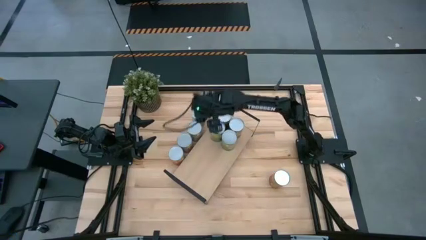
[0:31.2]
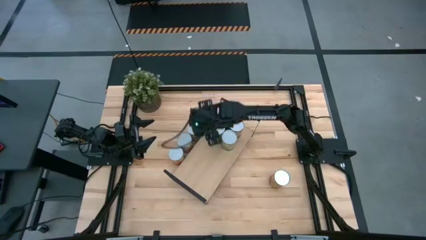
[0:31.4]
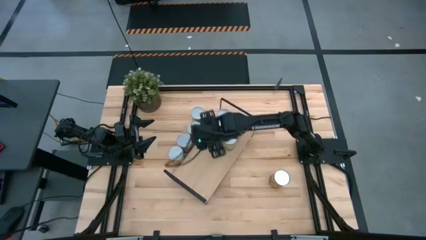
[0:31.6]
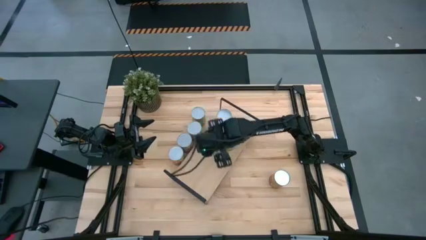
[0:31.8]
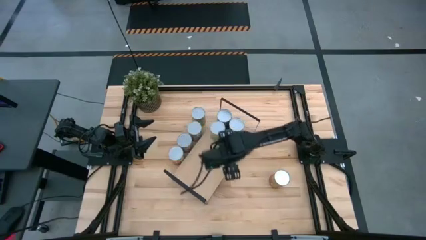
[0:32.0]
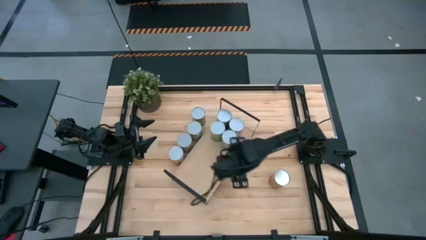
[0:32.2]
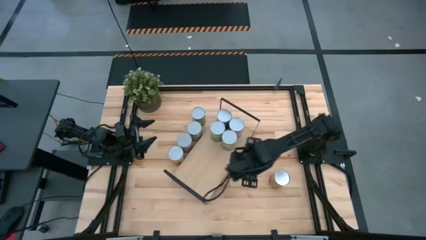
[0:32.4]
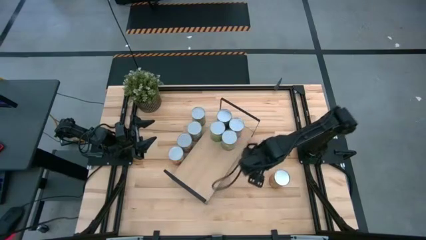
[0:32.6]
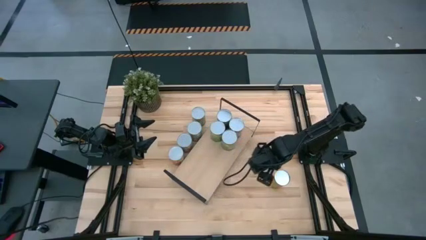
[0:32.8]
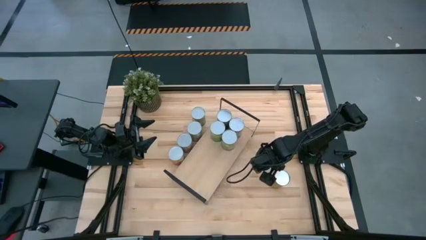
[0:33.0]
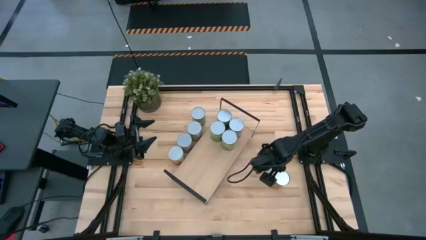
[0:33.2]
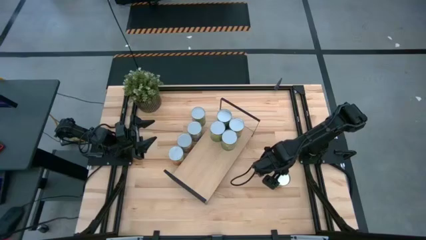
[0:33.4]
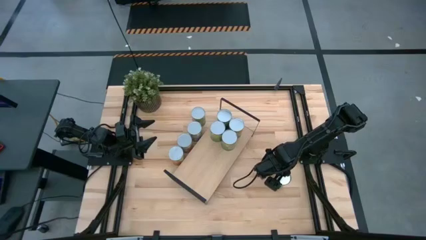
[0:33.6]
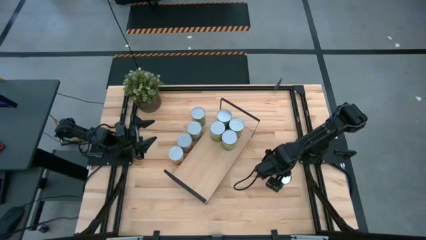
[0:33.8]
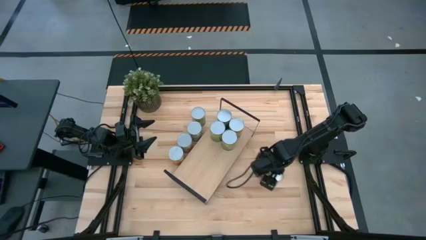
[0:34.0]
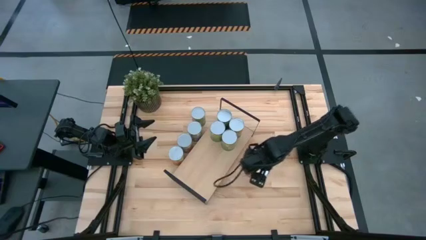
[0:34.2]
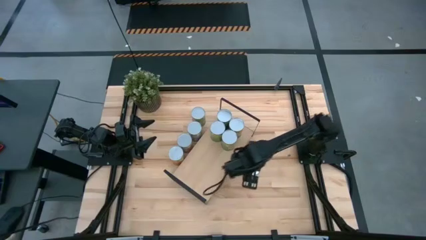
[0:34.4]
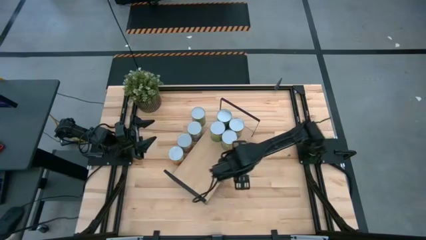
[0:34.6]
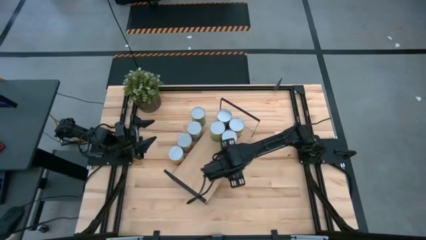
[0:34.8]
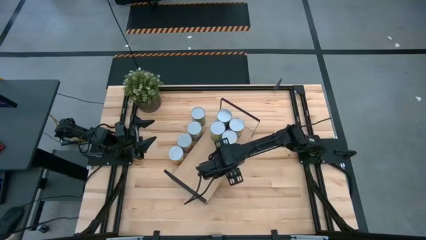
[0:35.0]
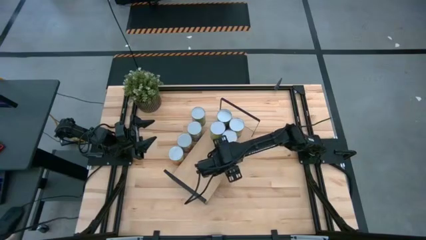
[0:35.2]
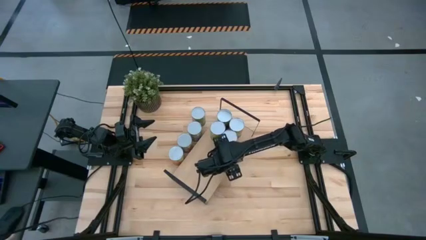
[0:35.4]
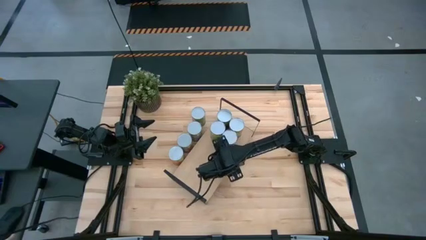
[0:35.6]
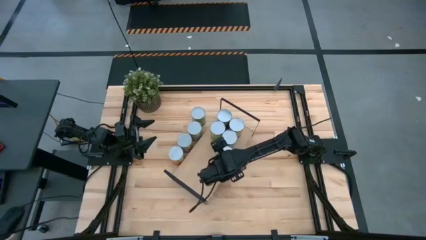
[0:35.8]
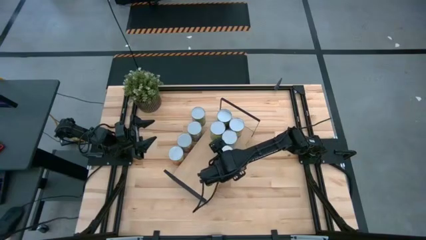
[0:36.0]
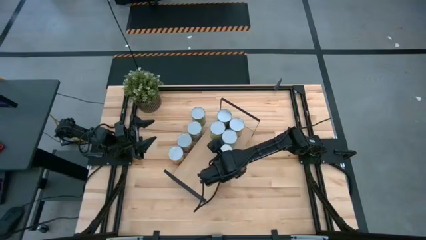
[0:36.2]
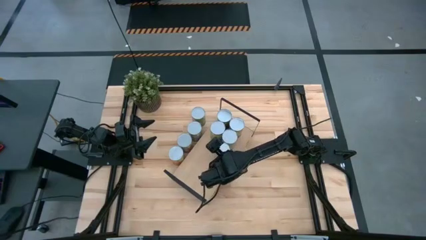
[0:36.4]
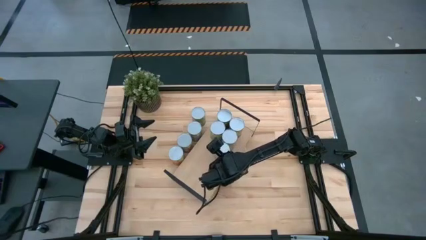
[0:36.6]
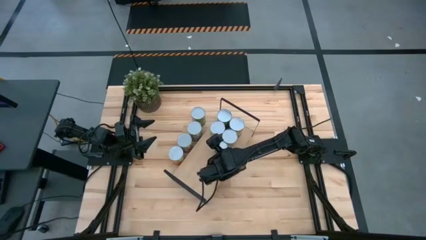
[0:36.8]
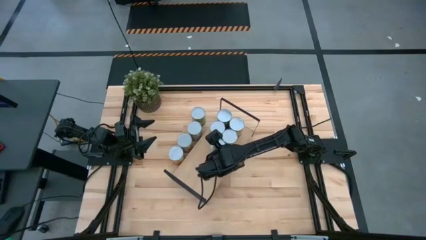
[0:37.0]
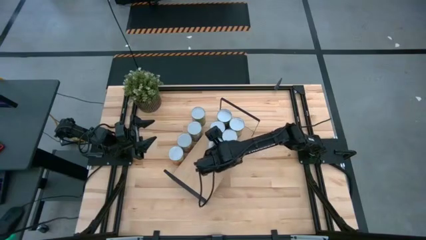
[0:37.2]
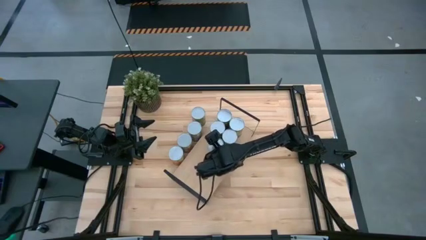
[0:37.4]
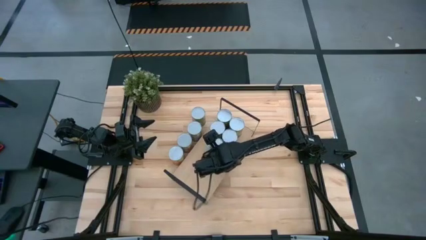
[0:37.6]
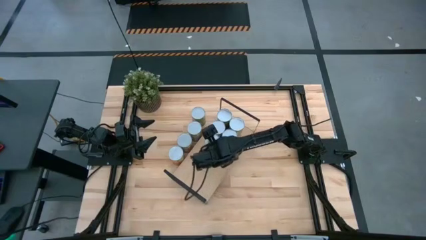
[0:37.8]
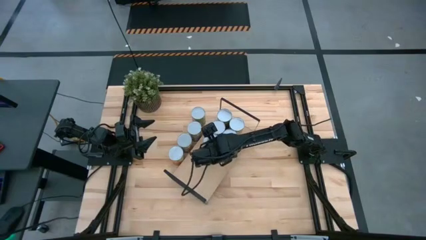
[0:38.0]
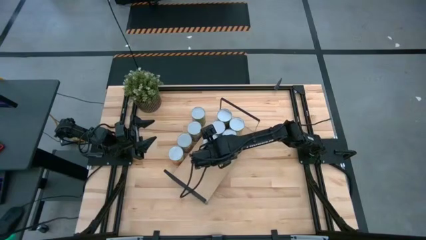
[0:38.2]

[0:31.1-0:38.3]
Task: Pick and place cans onto a shelf
Put the right canned pineapple on the shelf

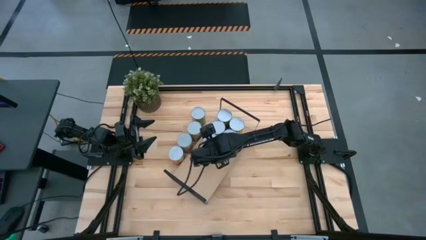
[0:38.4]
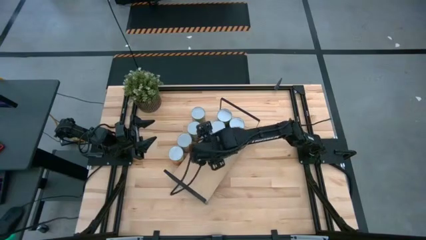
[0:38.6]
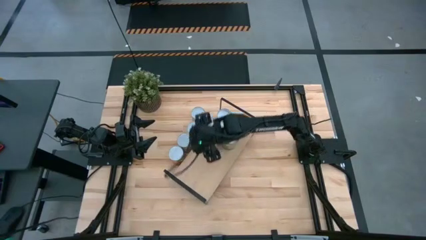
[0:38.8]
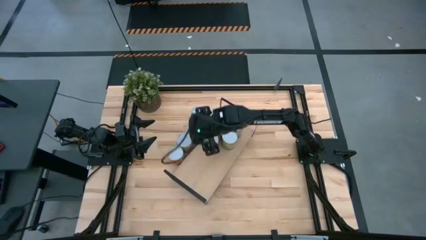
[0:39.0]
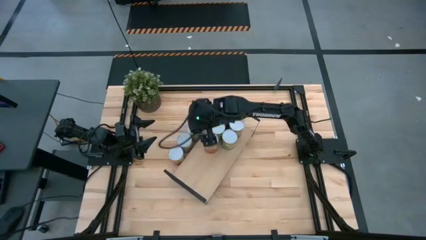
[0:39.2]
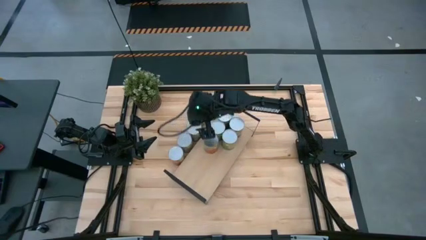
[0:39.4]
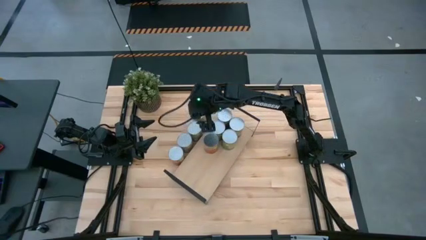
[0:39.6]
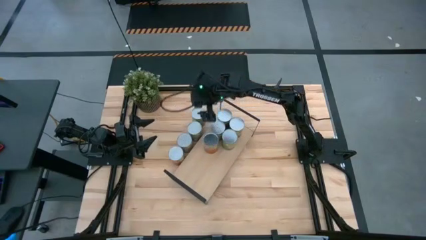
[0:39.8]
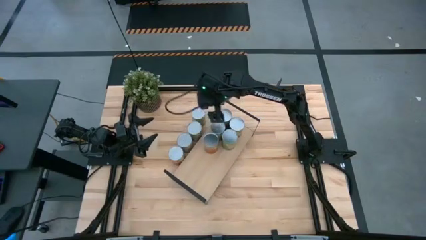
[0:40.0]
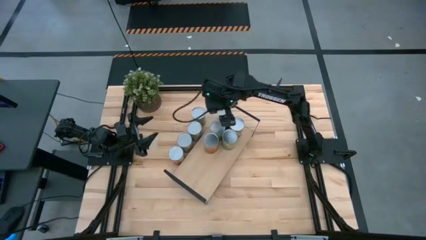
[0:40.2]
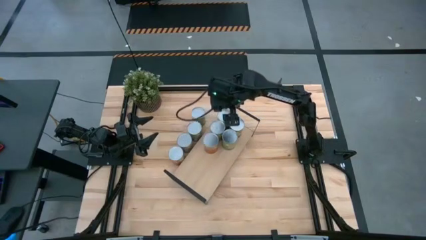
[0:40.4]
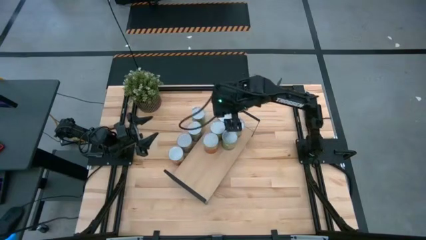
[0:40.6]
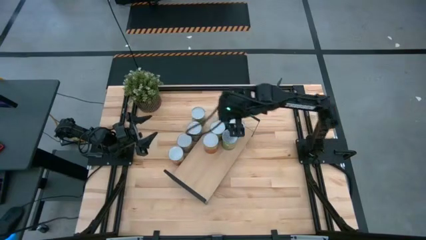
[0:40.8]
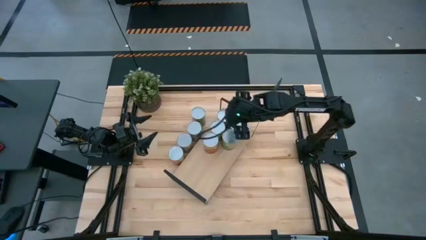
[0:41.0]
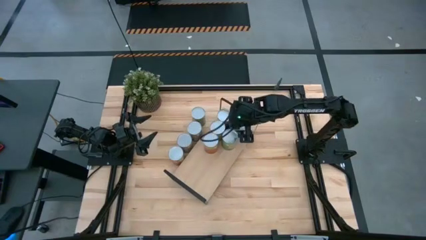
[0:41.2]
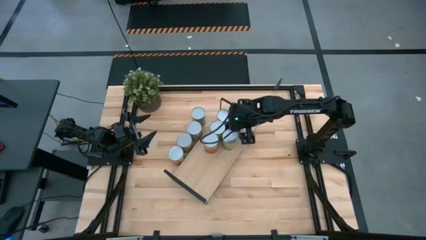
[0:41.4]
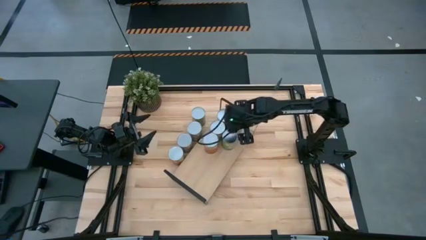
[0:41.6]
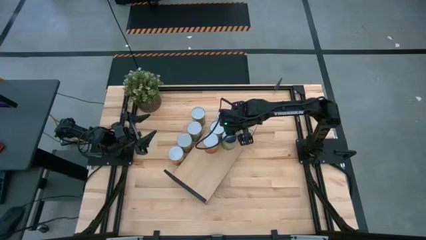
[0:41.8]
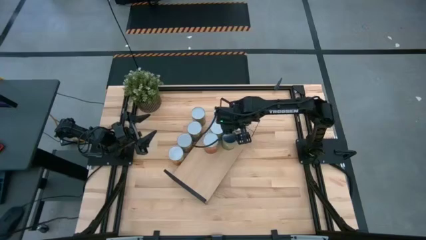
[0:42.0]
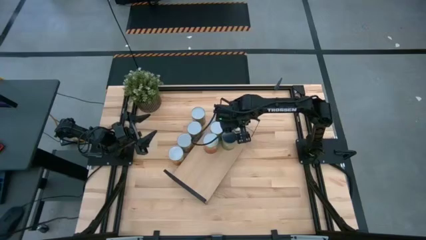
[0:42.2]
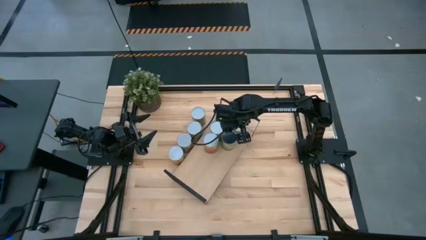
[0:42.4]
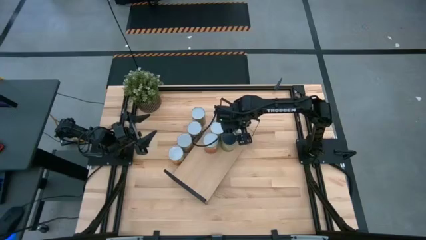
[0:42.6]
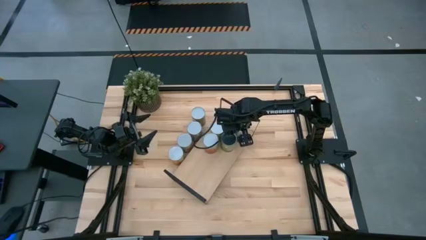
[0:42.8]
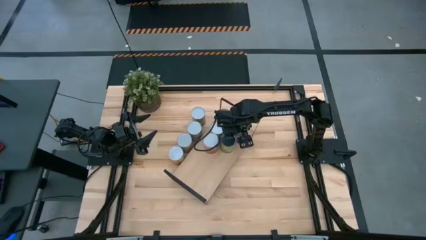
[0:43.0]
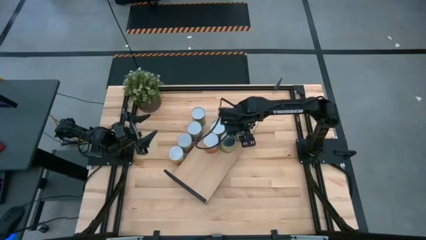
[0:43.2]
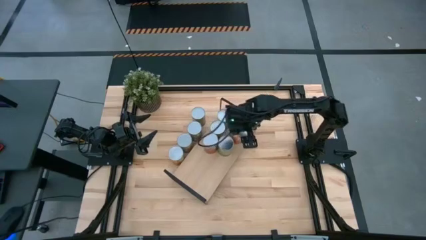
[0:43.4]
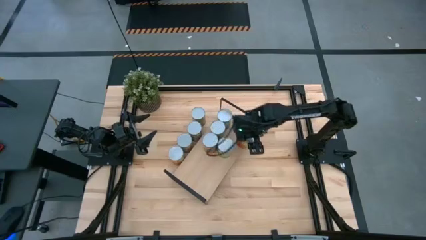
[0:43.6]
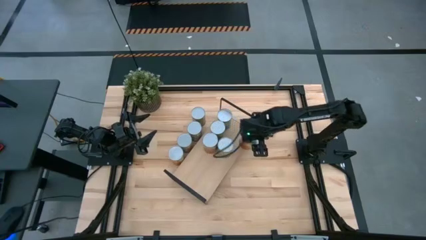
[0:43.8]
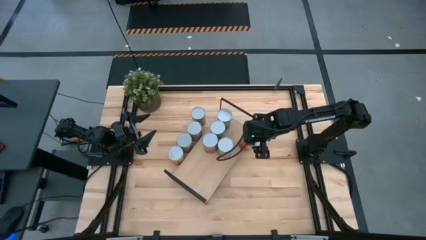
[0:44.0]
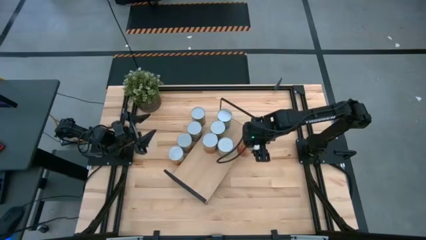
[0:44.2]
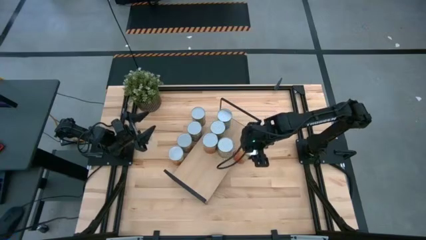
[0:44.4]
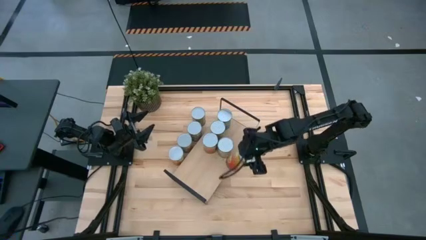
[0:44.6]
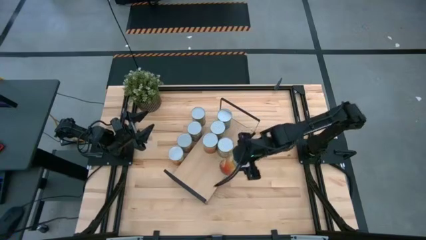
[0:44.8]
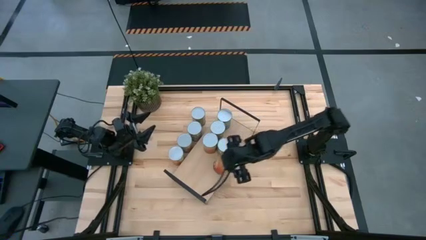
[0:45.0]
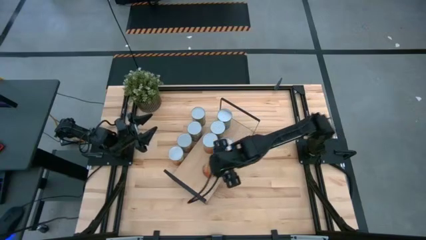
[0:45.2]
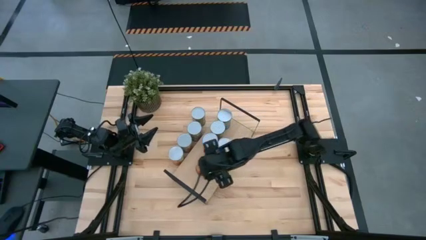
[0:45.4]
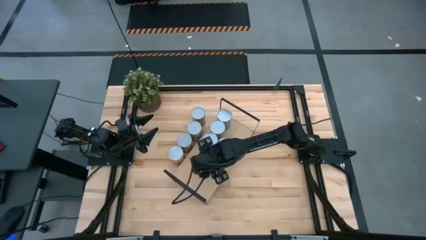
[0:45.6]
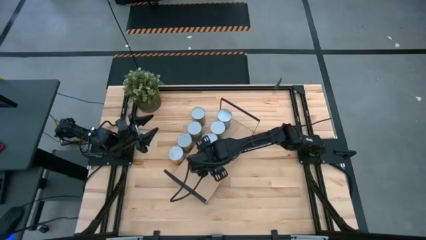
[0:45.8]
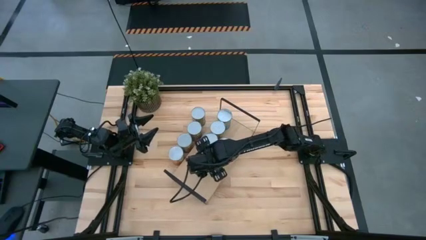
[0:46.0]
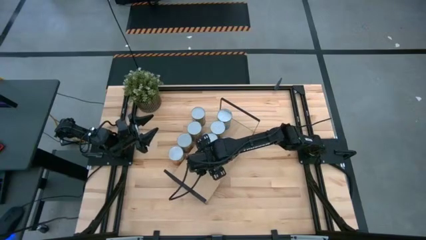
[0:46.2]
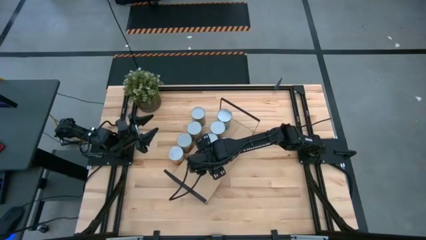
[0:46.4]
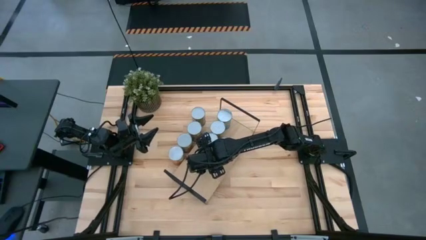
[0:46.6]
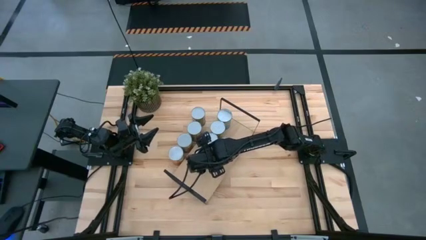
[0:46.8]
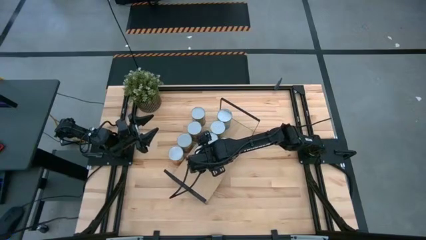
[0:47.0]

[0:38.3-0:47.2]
Move the canned corn from the right to the left on the shelf
